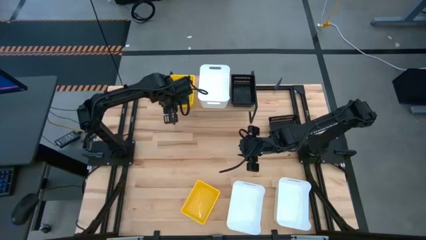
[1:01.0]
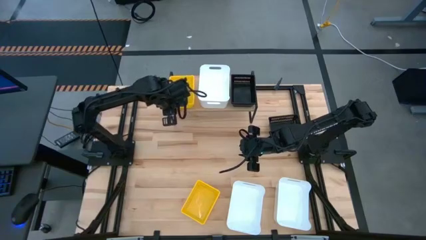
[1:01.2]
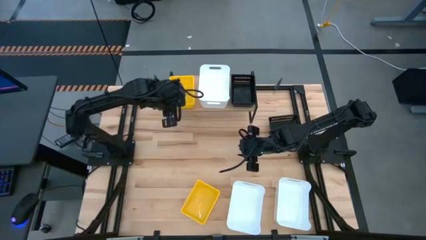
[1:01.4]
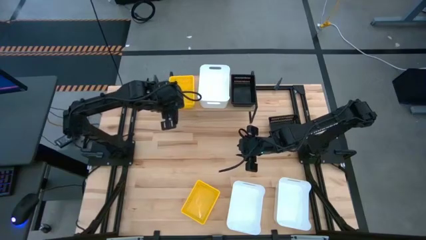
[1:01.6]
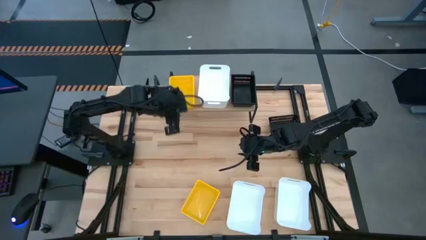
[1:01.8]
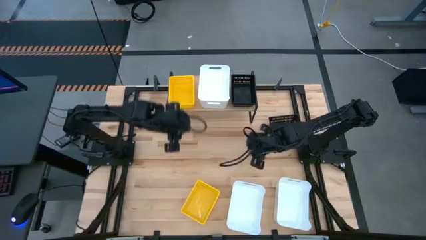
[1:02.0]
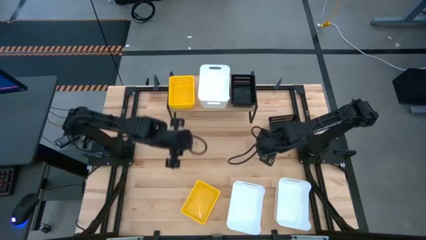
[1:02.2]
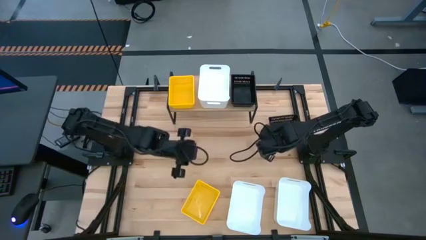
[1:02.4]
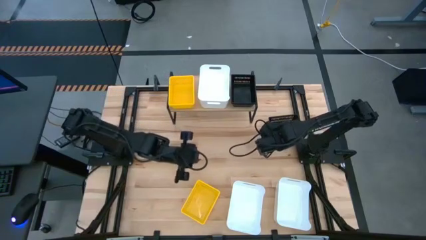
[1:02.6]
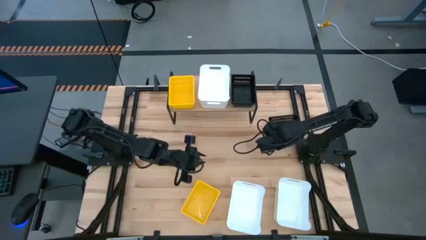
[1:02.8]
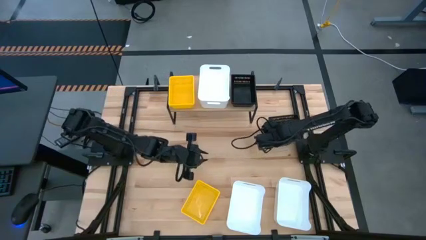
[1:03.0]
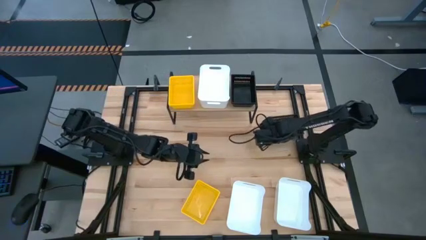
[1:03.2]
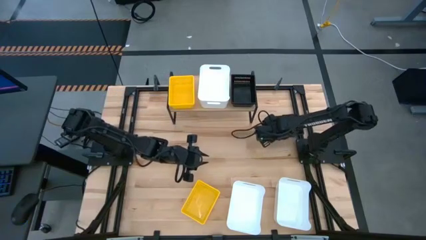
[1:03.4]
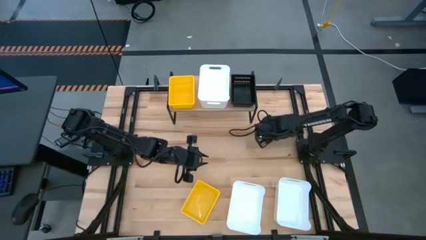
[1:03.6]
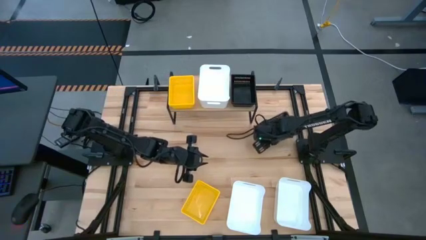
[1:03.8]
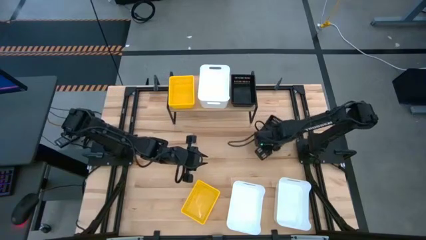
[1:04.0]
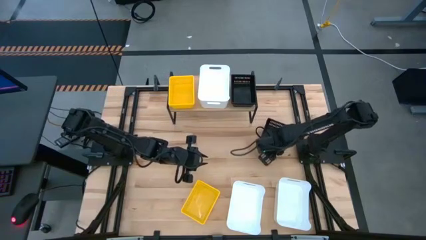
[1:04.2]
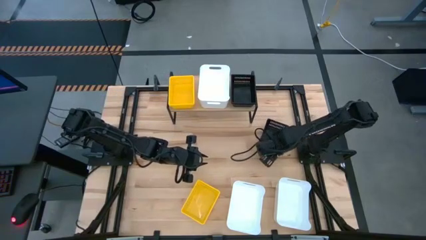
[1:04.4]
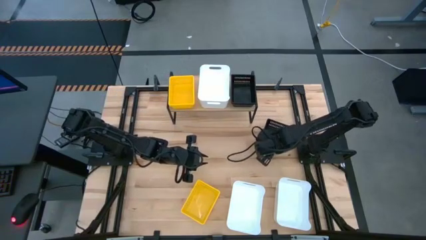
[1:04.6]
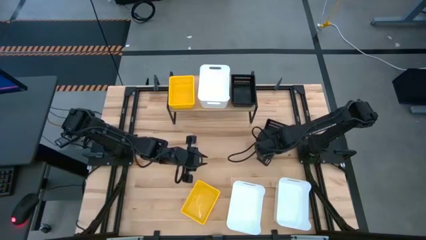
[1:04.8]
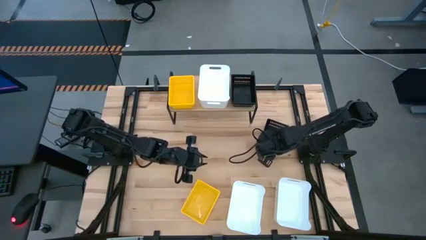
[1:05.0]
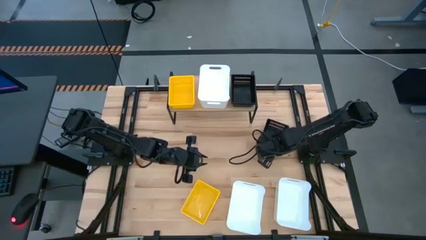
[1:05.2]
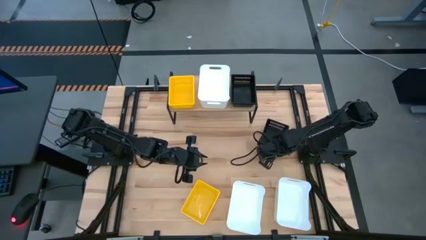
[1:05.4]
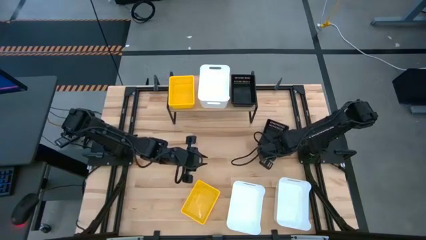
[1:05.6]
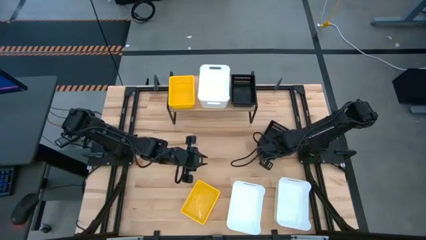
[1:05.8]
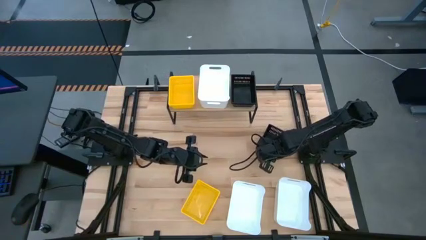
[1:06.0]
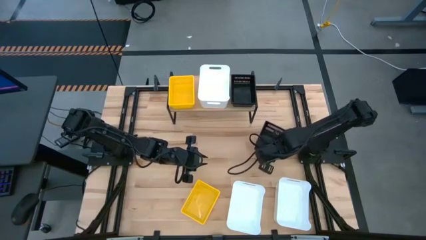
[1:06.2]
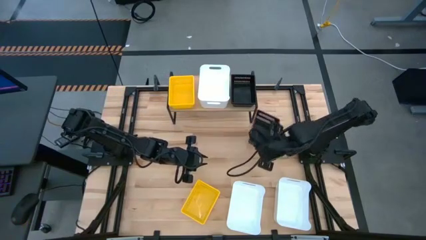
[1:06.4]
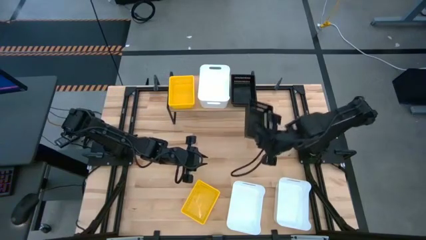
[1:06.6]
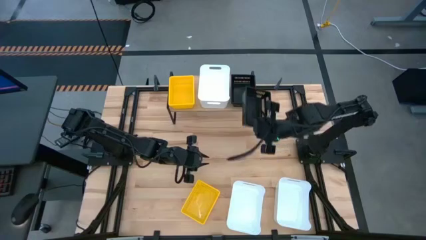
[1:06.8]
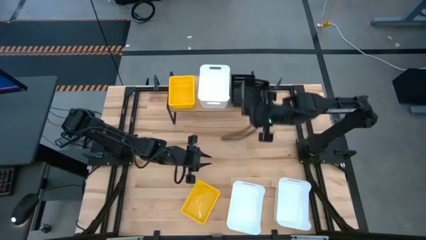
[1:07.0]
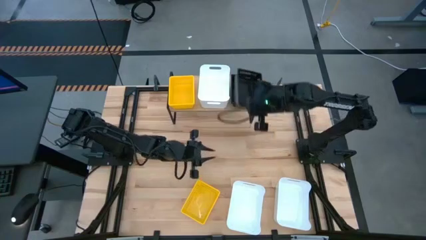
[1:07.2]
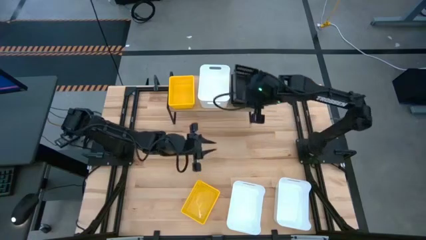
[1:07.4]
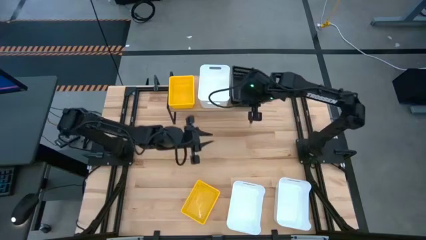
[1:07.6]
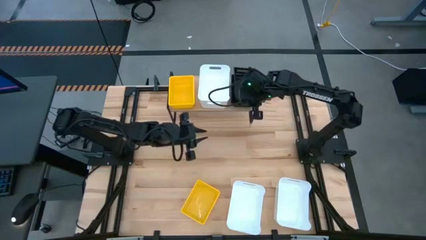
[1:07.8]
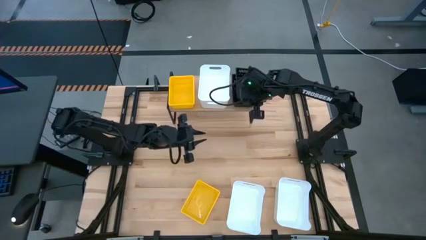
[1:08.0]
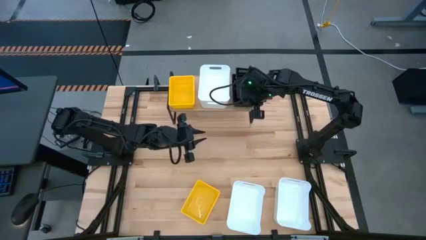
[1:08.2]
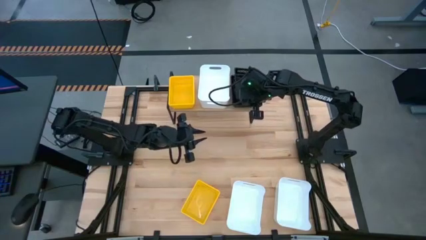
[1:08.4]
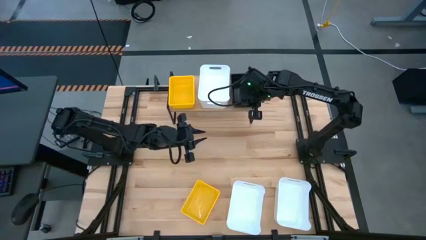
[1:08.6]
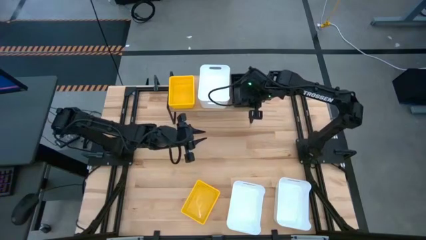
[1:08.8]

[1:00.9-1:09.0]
Task: Stack baskets on shelf by color
Stack the black basket on the black basket on the shelf

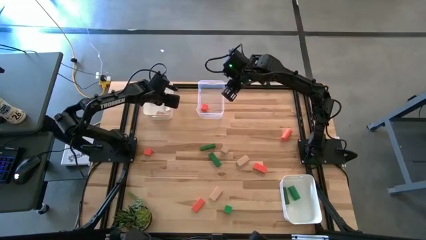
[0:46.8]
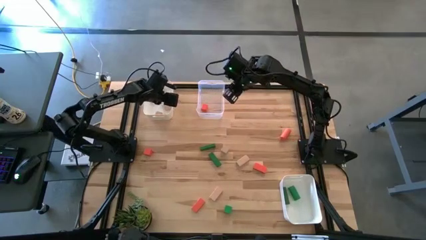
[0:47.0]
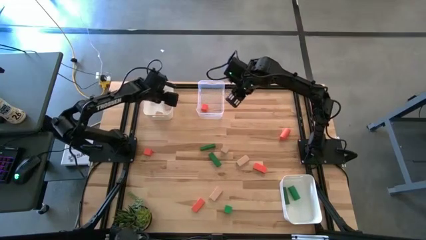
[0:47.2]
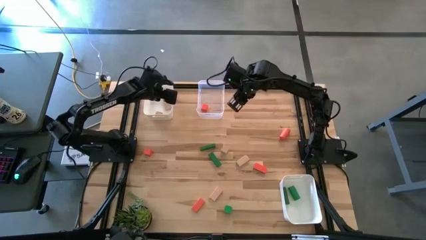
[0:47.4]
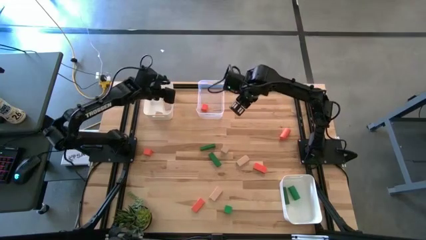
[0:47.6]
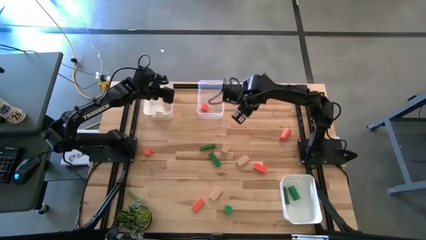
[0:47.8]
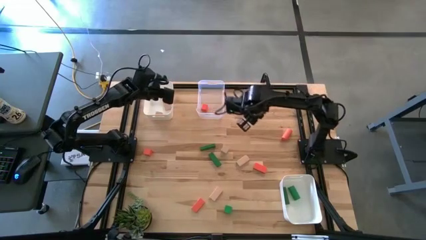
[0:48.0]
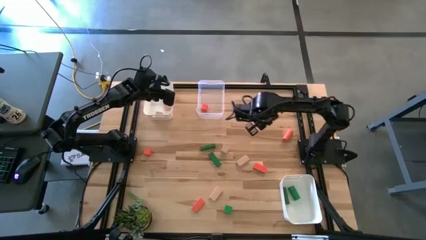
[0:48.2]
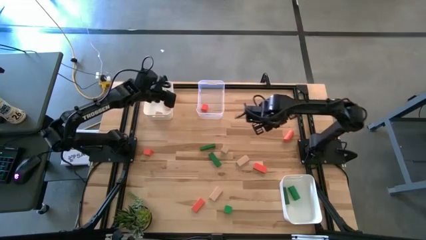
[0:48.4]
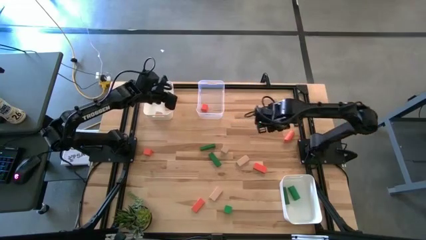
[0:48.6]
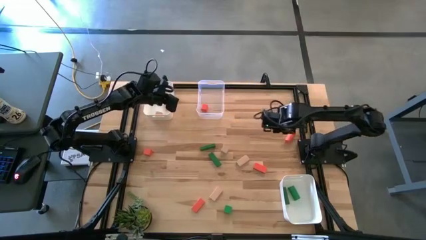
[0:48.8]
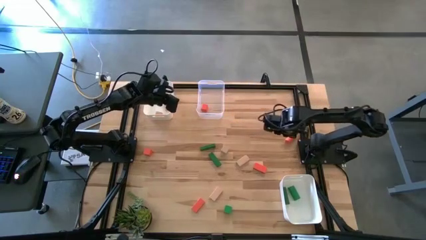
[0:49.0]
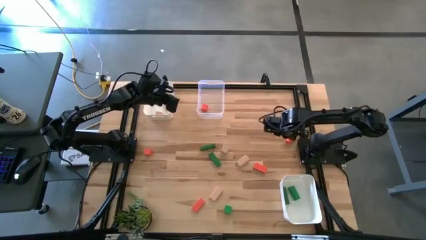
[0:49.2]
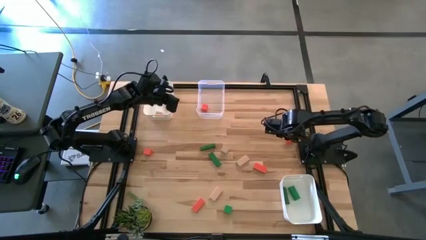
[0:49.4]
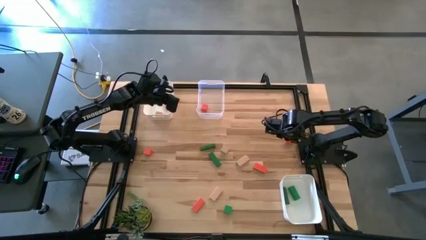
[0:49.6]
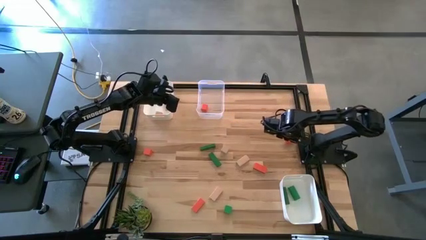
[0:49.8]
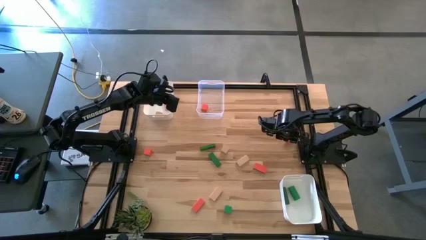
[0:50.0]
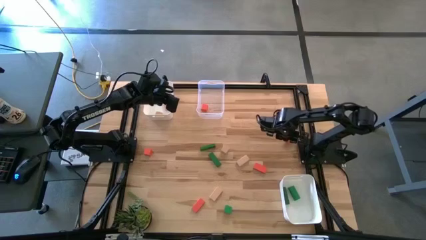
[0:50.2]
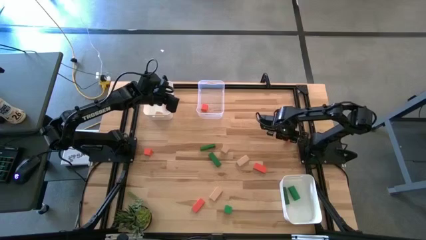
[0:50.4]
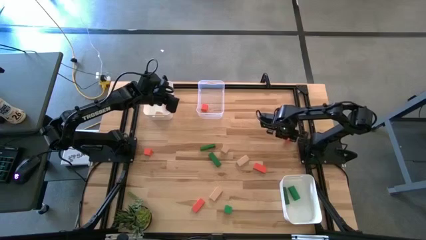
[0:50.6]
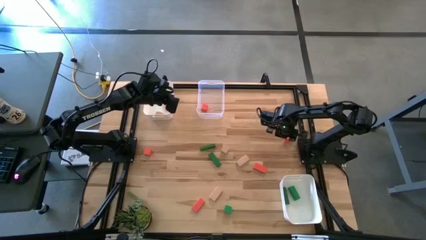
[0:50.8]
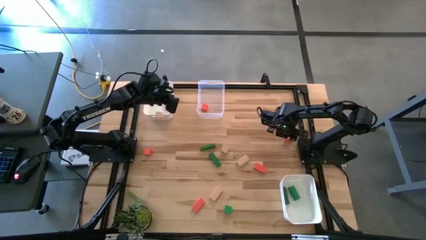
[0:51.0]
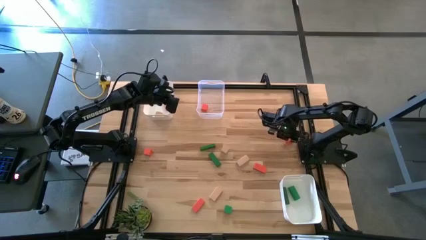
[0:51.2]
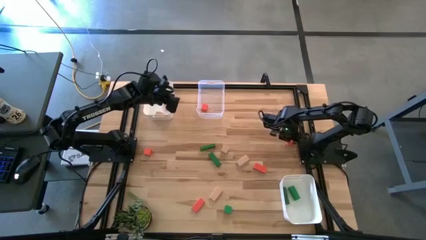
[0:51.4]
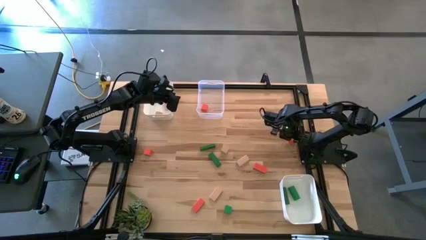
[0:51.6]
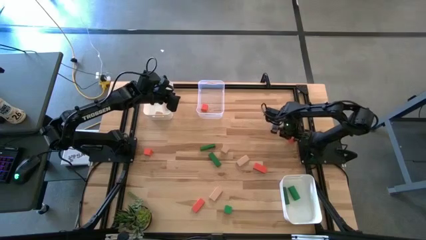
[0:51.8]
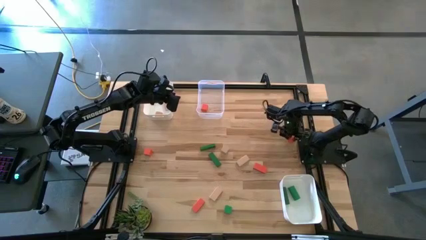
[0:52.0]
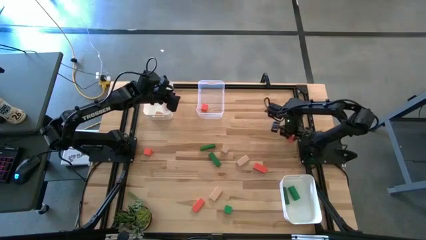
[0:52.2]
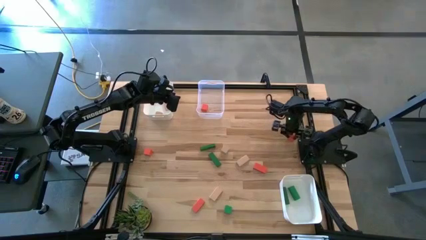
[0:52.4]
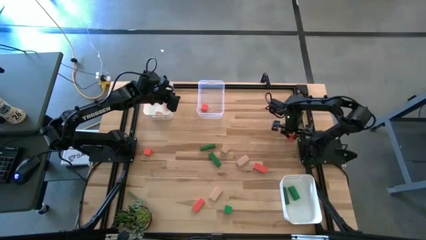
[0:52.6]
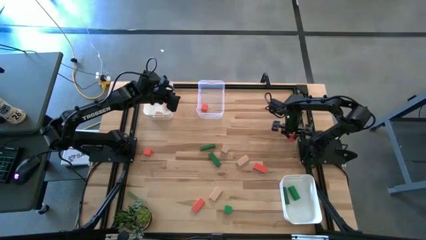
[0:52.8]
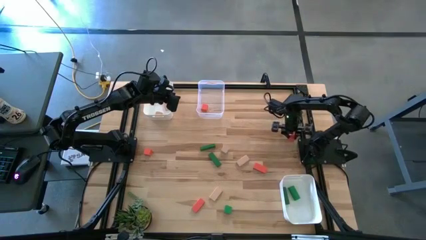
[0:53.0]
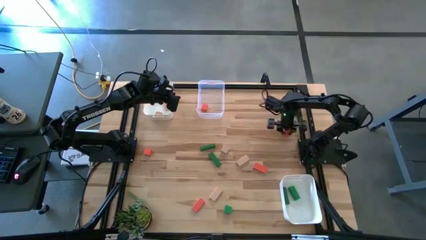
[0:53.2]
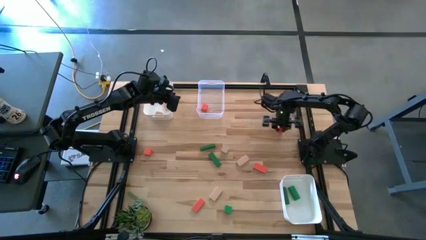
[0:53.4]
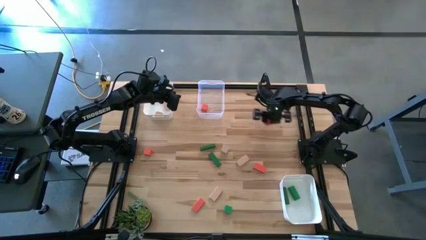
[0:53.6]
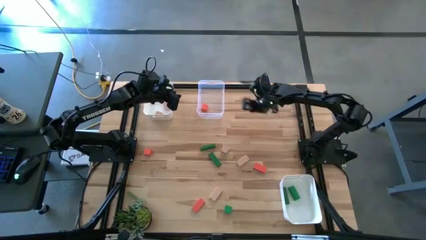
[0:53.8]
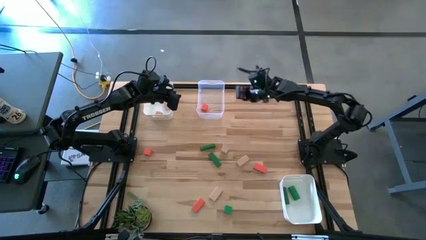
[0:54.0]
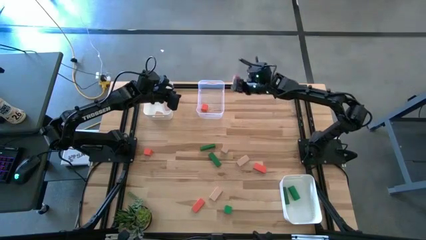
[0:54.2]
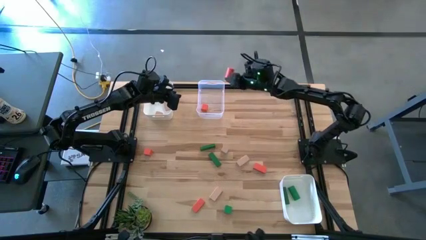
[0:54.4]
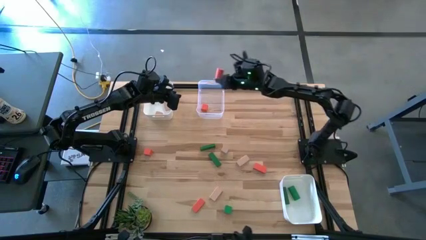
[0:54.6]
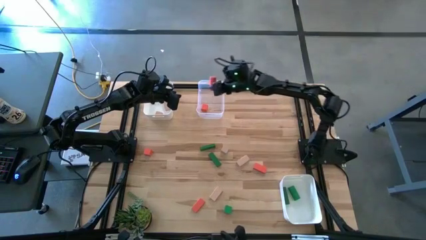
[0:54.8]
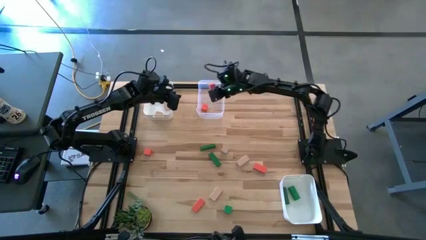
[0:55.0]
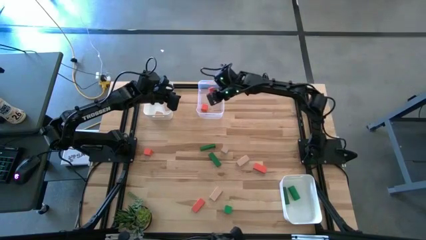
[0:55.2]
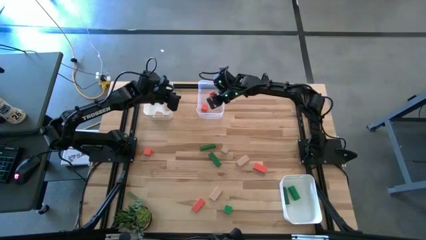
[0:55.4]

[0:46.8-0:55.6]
Task: Sort & place blocks by color
Put the orange block into the transparent bin
